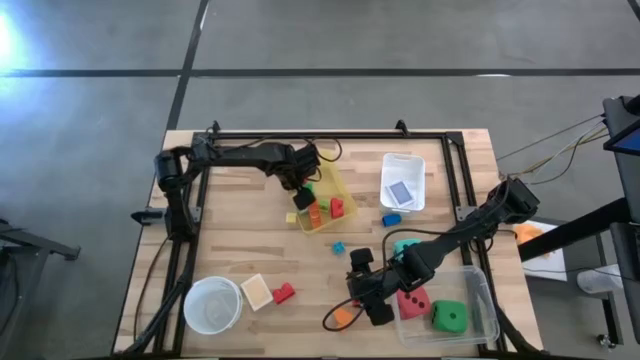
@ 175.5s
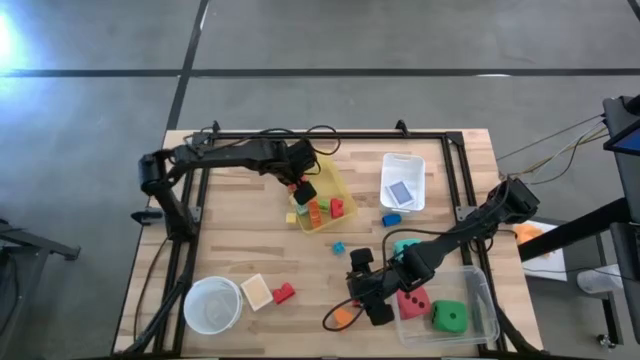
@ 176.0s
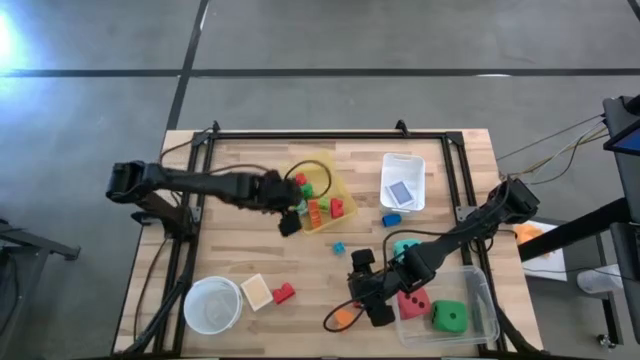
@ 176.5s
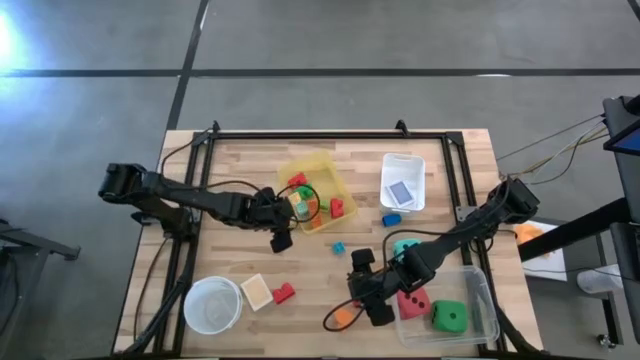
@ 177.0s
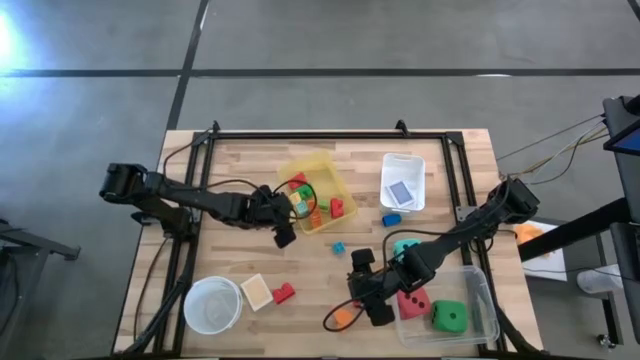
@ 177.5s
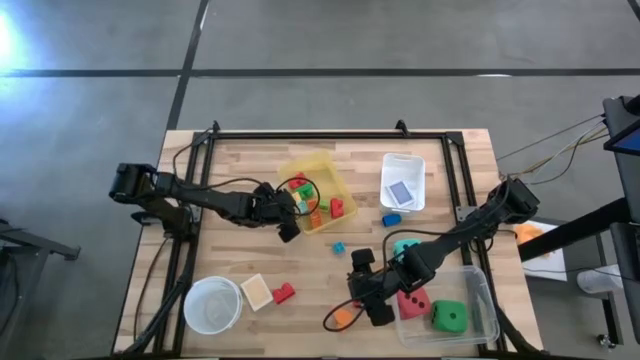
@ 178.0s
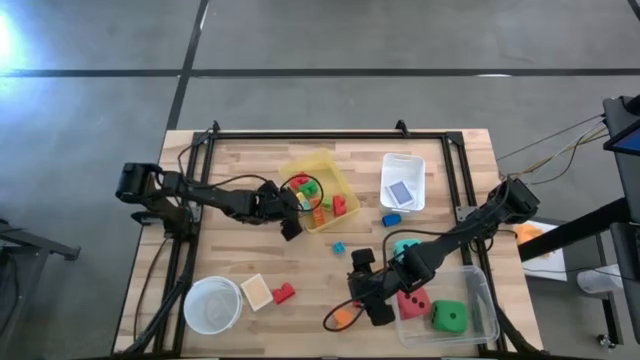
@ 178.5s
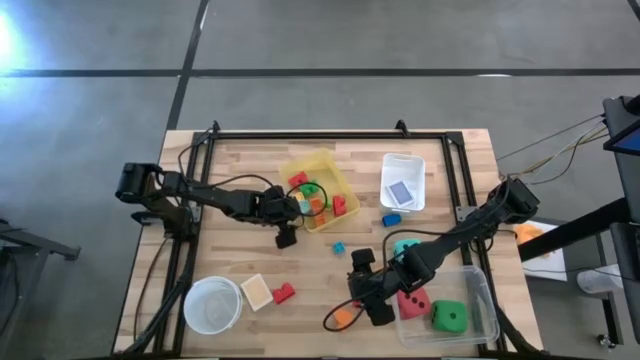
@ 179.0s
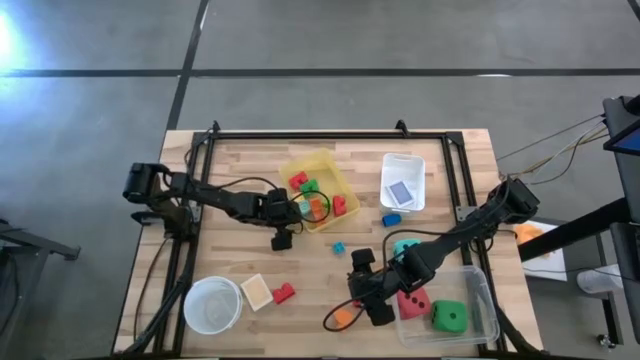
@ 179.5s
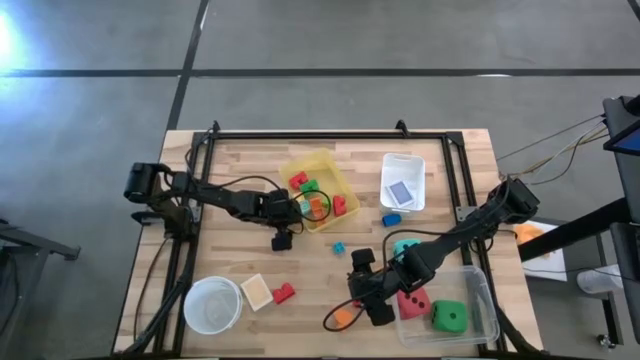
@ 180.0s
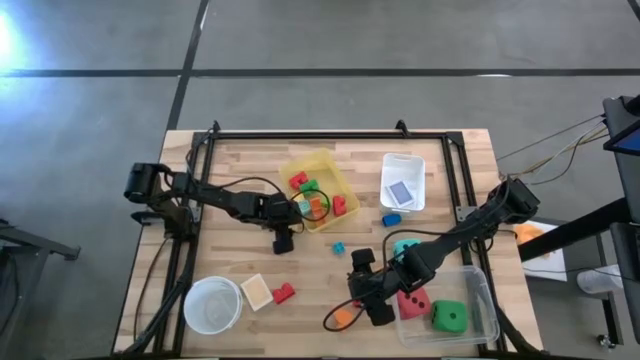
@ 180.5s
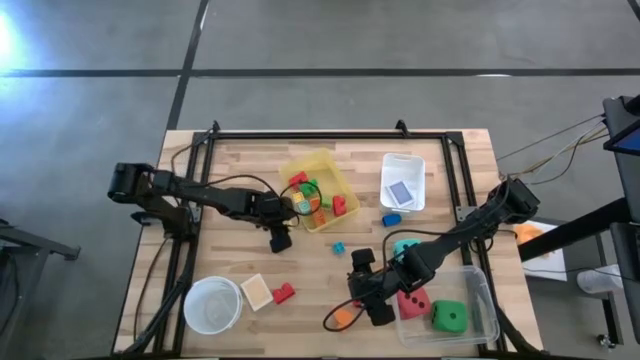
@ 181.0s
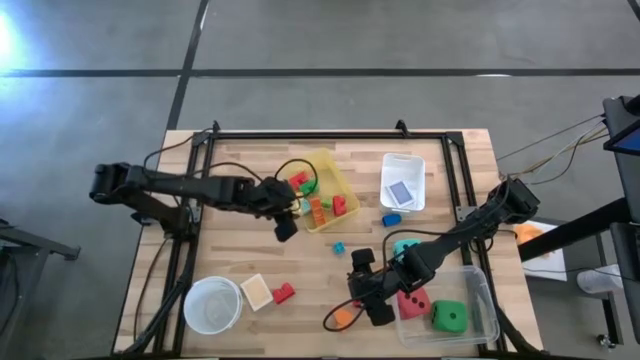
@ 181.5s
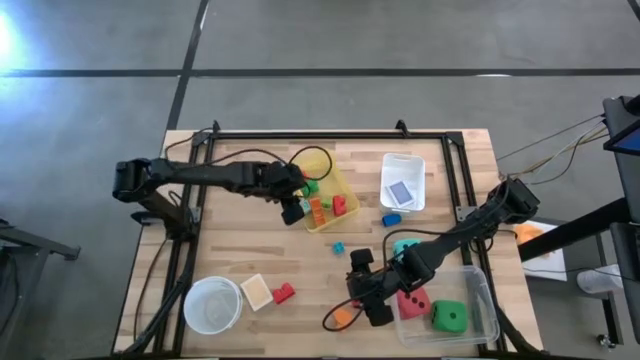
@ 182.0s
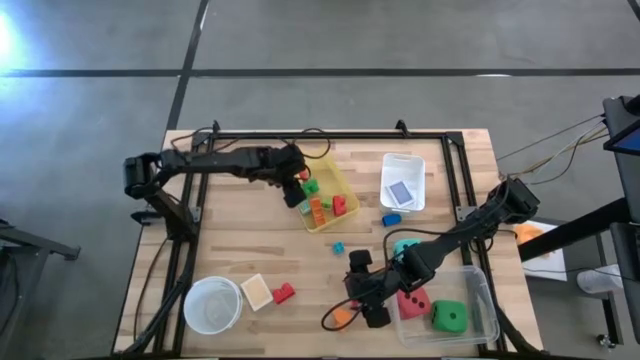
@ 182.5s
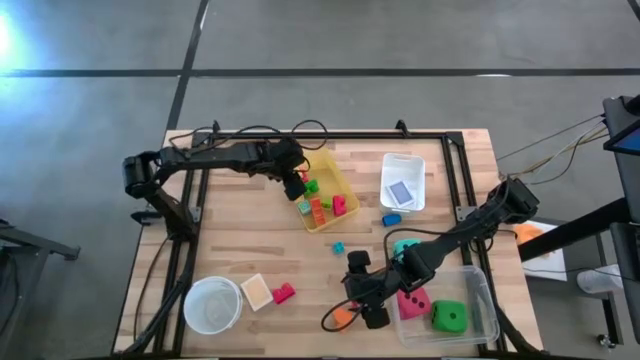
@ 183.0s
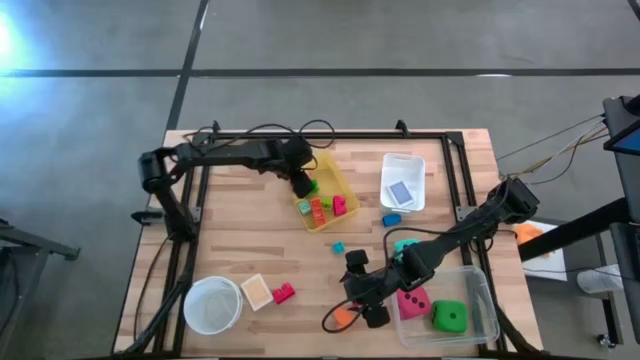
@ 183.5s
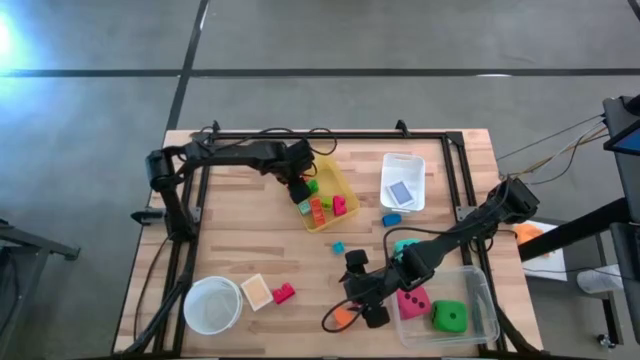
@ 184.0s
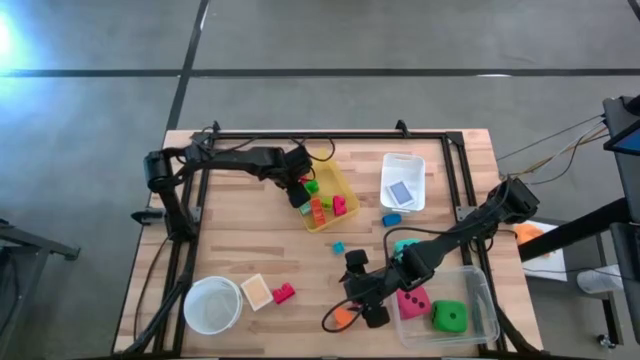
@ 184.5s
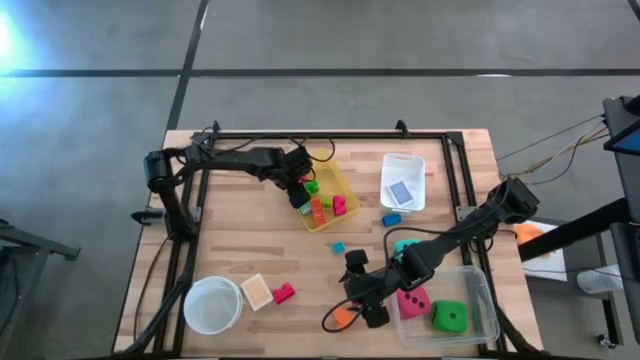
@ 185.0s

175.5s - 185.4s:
Task: Pick & Place Toys
Put the yellow game piece into the yellow bin

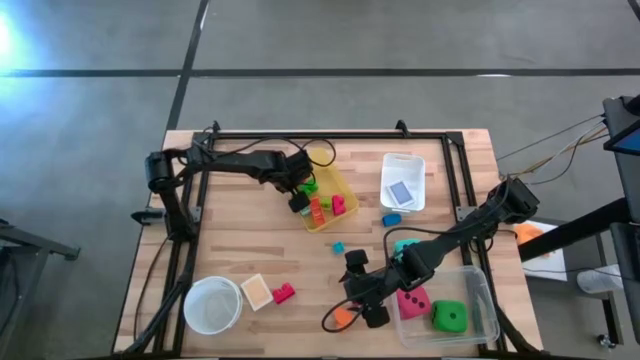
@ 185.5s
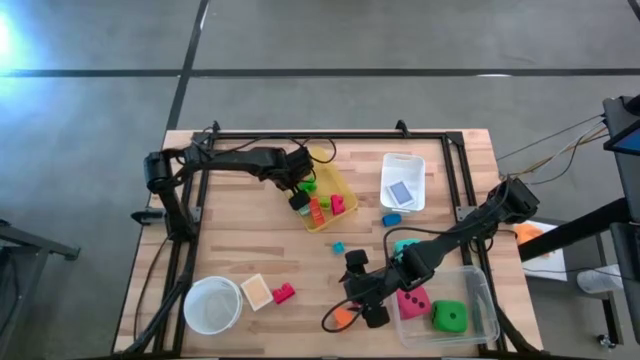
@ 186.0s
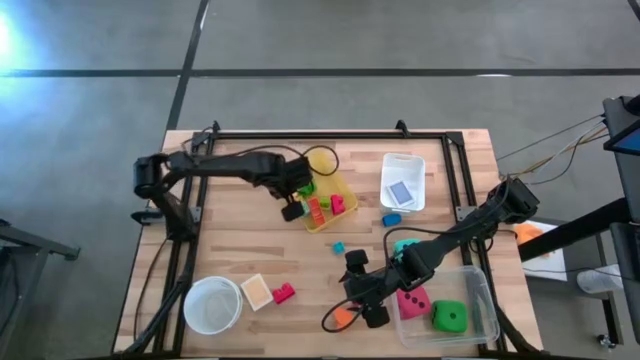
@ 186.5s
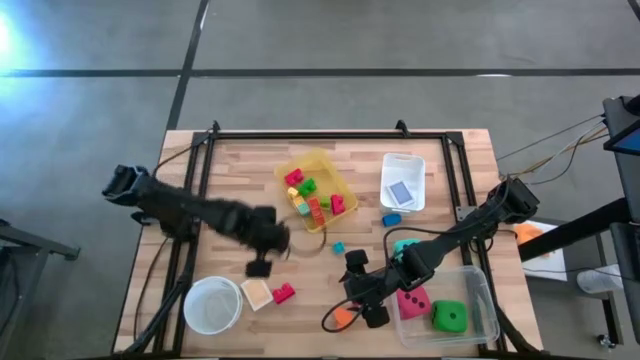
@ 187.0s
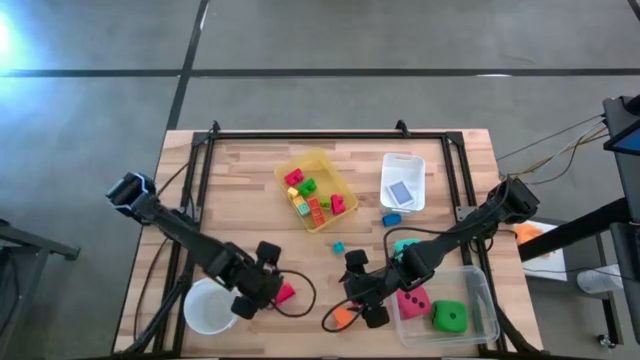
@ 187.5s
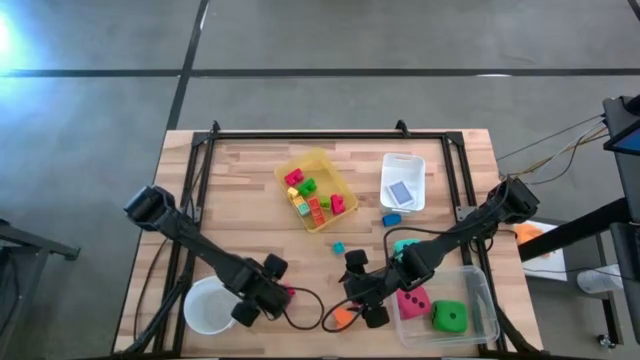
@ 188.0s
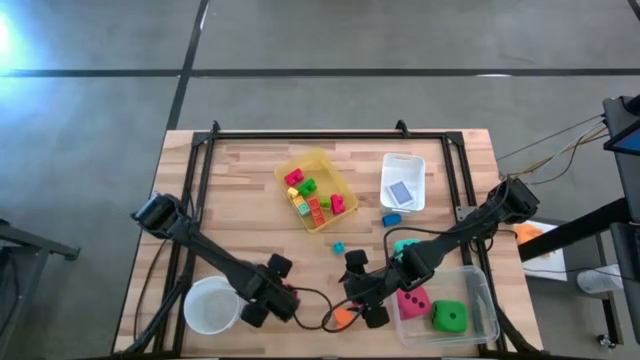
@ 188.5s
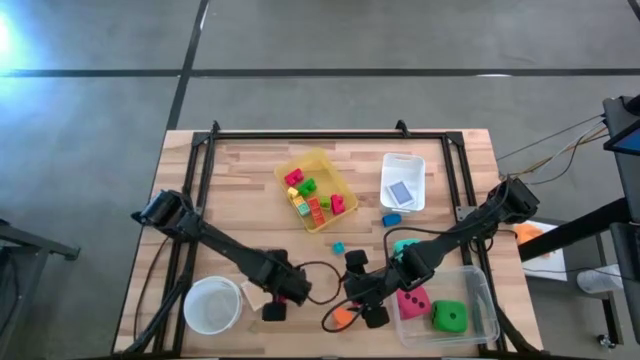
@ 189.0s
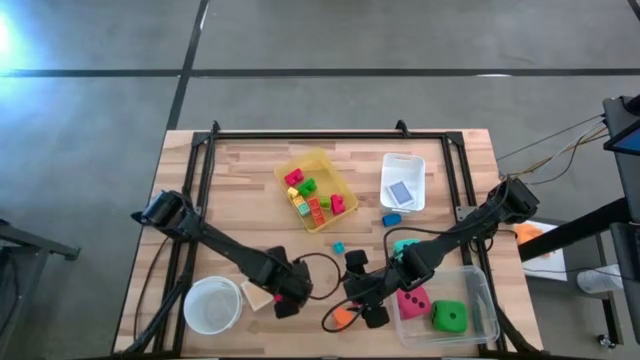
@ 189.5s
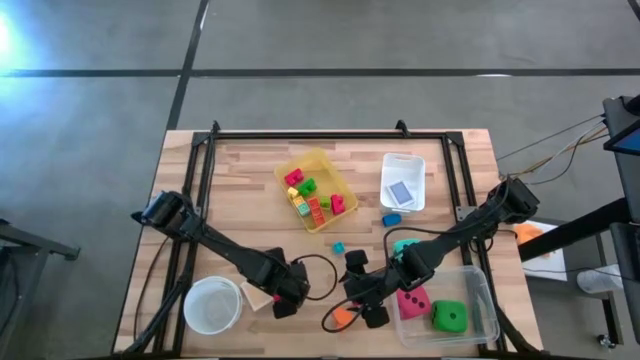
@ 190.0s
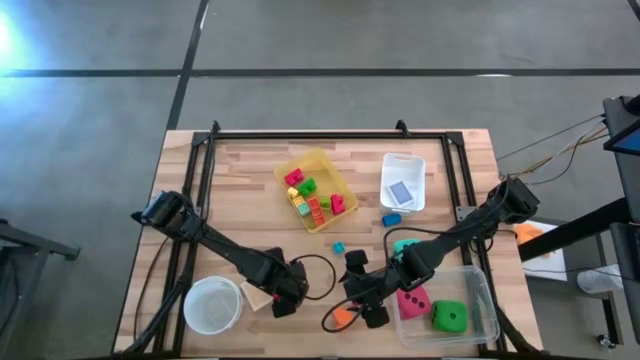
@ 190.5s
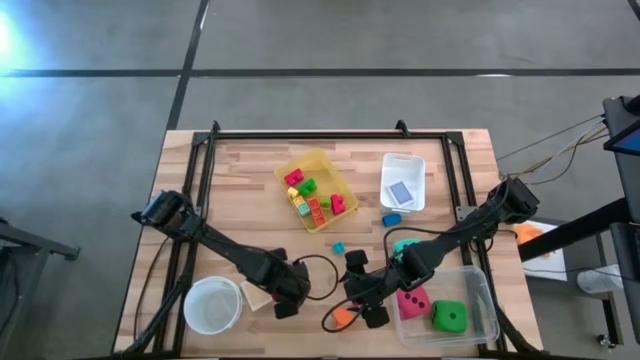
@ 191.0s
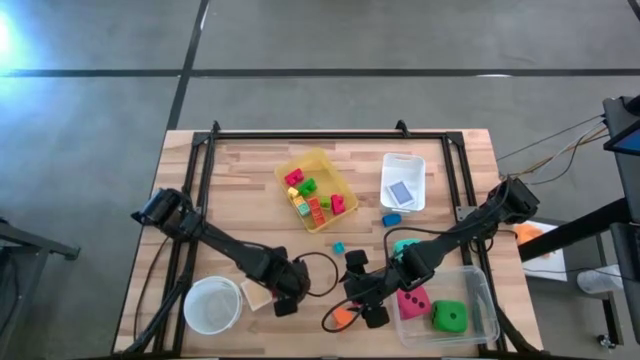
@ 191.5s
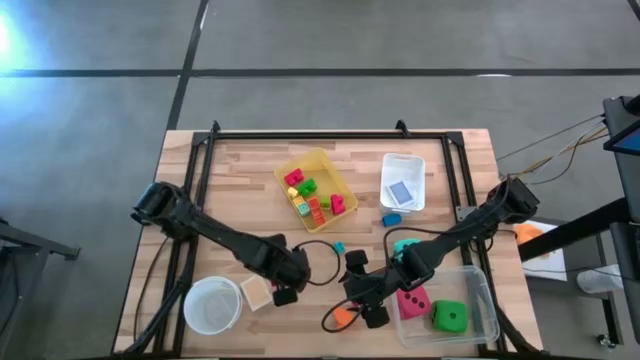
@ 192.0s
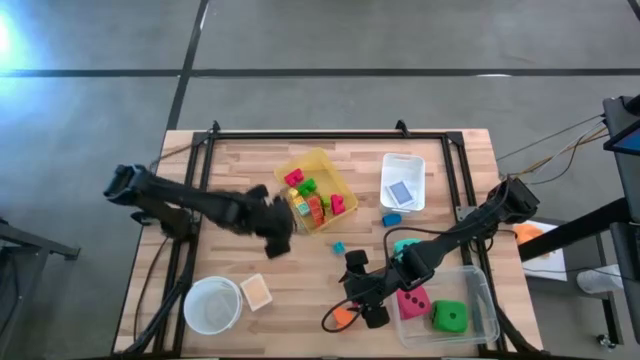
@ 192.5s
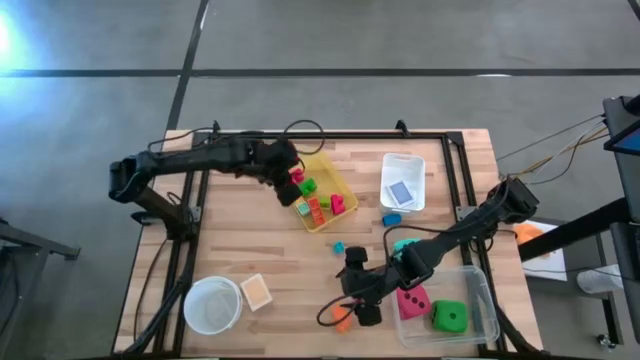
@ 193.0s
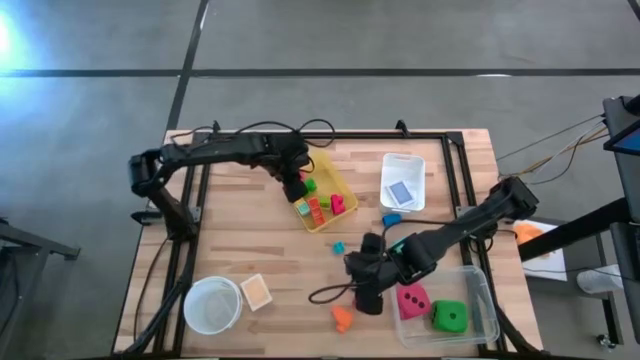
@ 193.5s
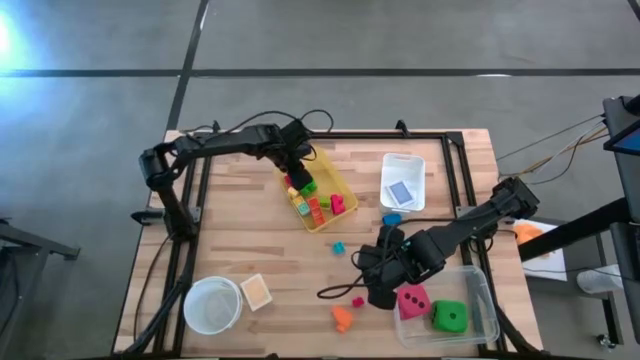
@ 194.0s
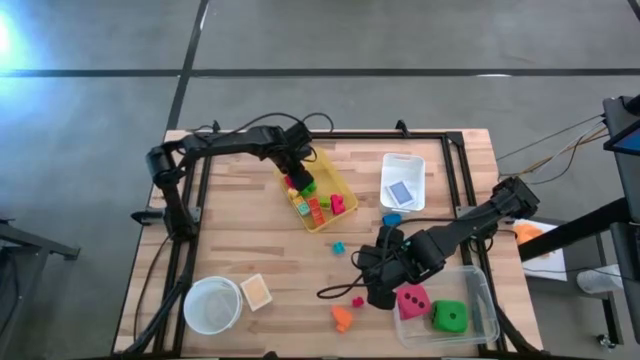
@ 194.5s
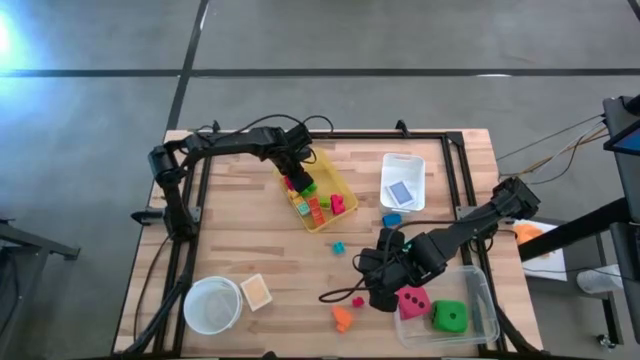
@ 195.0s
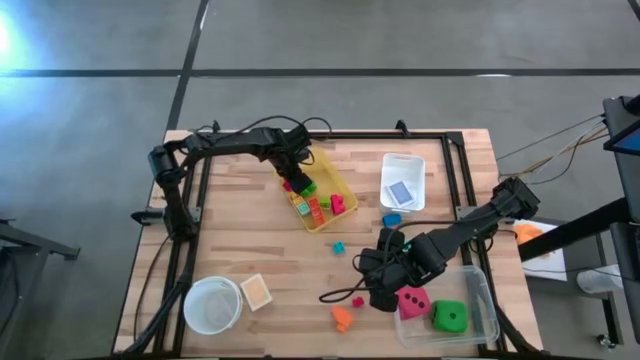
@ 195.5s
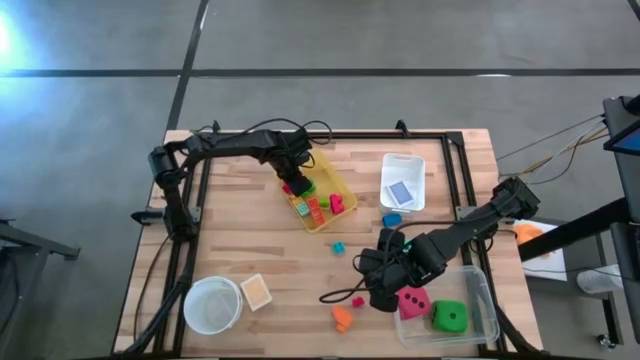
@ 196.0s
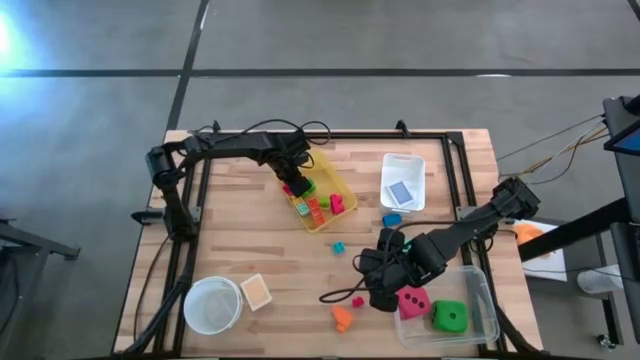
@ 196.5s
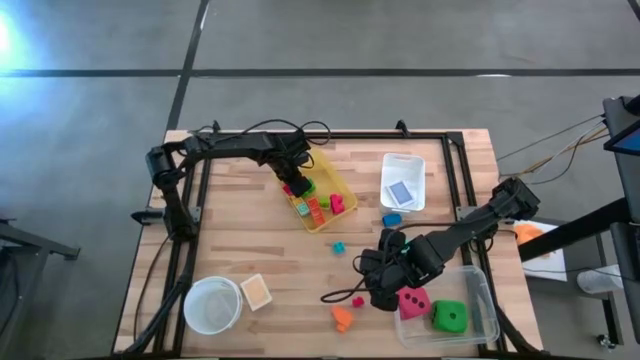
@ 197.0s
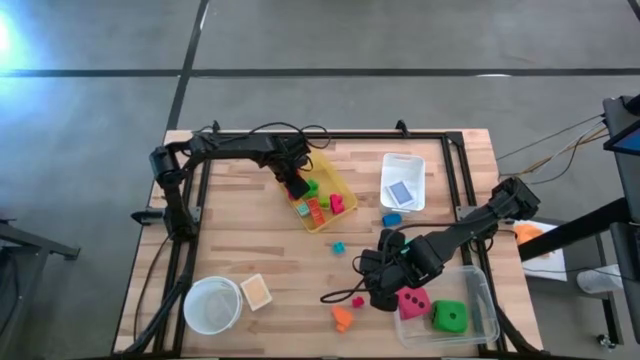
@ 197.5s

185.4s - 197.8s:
Put the red game piece into the yellow bin
